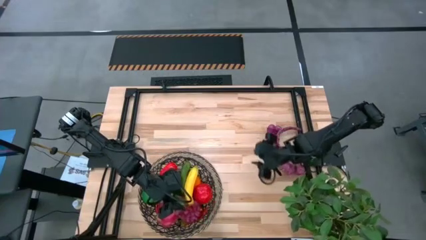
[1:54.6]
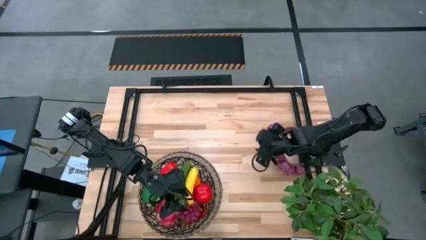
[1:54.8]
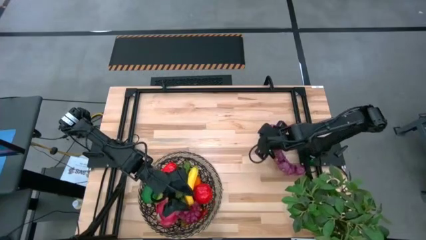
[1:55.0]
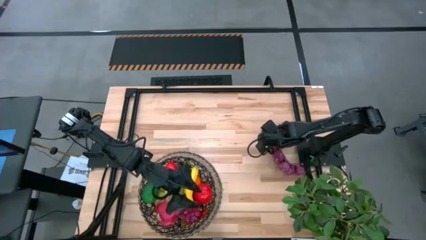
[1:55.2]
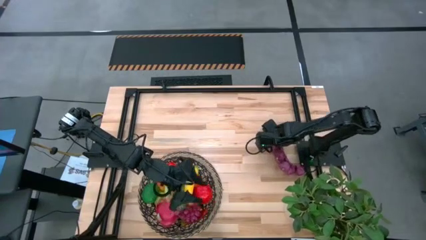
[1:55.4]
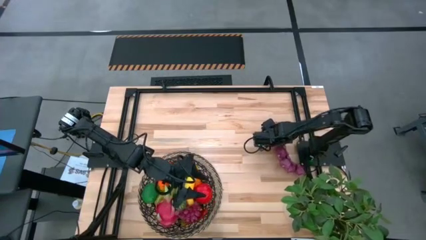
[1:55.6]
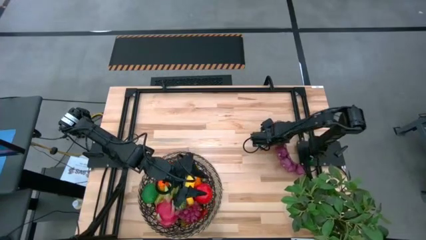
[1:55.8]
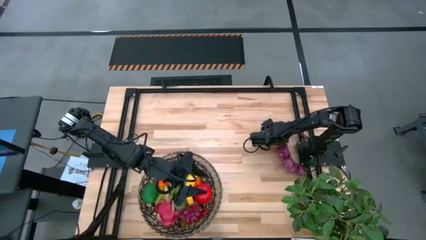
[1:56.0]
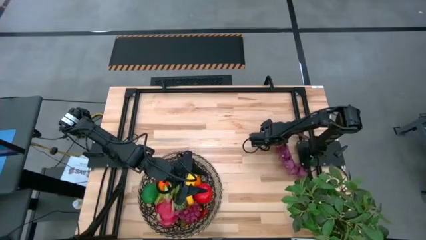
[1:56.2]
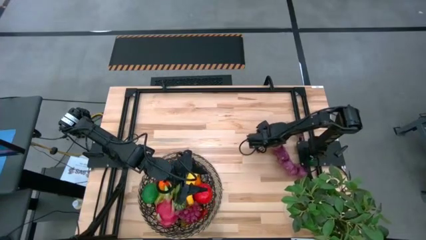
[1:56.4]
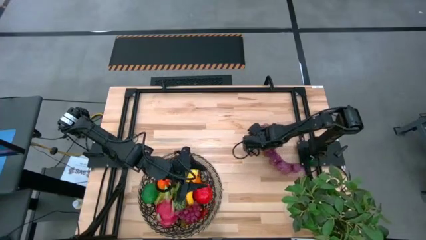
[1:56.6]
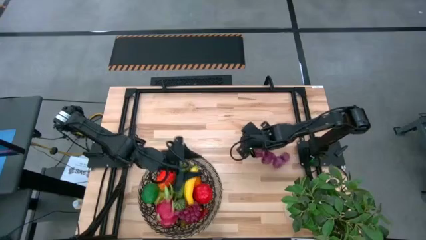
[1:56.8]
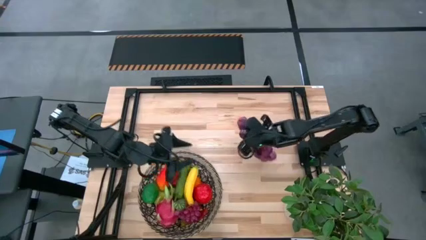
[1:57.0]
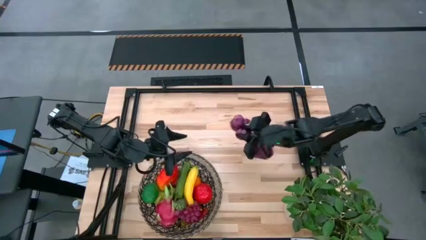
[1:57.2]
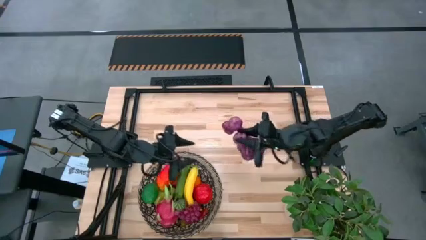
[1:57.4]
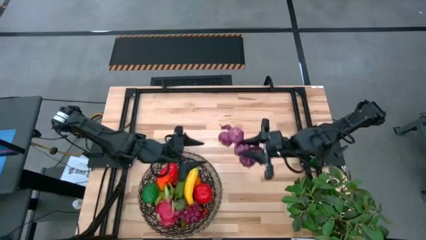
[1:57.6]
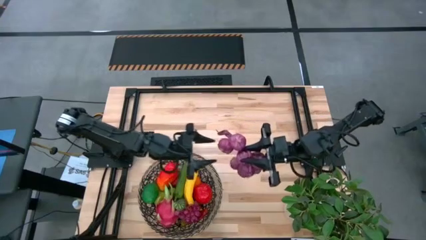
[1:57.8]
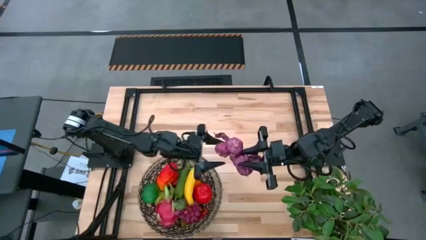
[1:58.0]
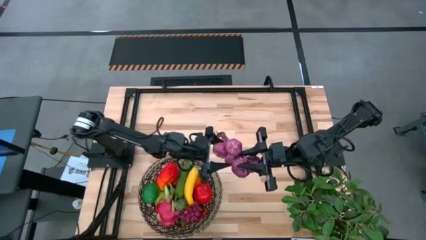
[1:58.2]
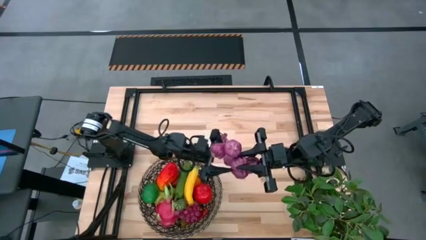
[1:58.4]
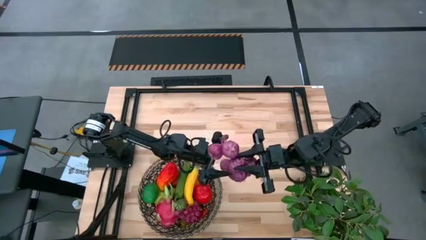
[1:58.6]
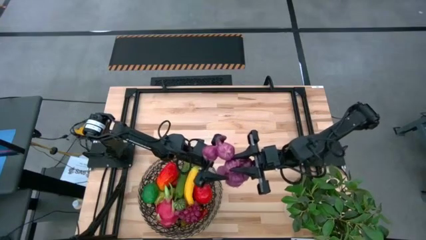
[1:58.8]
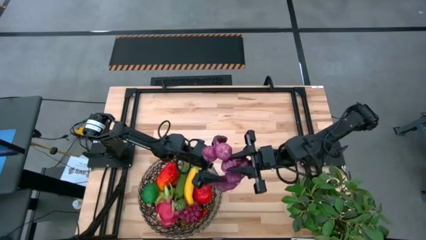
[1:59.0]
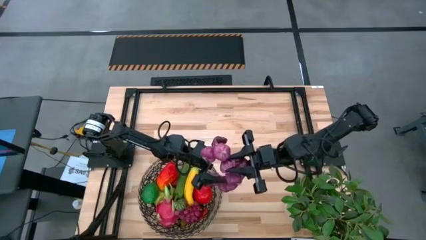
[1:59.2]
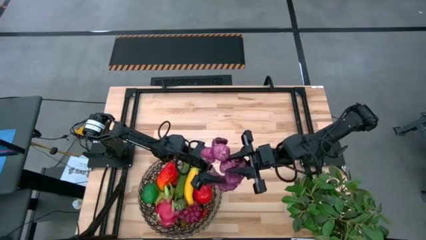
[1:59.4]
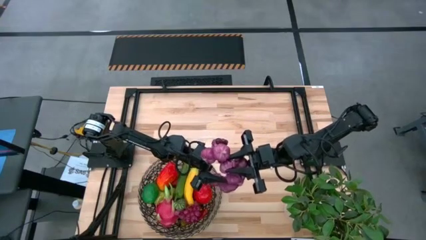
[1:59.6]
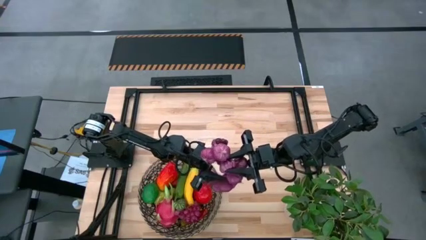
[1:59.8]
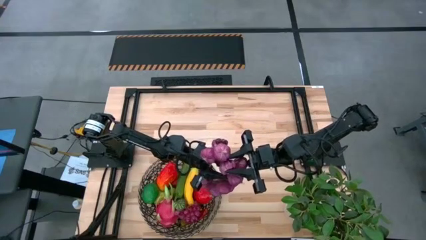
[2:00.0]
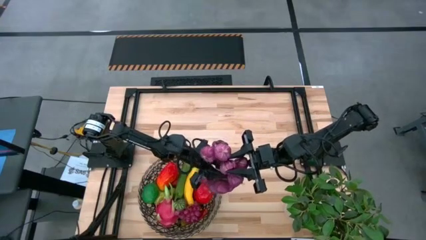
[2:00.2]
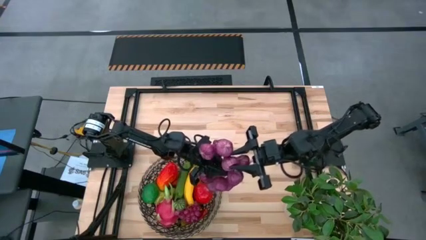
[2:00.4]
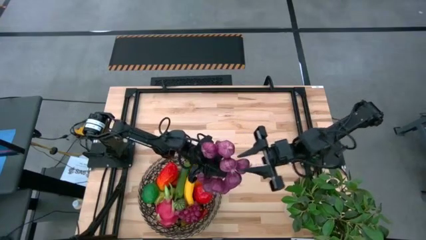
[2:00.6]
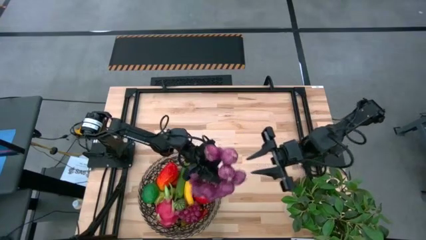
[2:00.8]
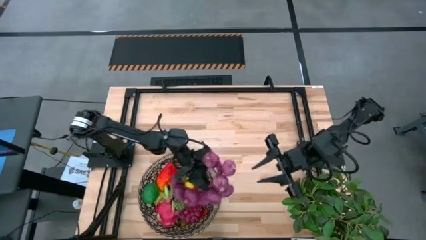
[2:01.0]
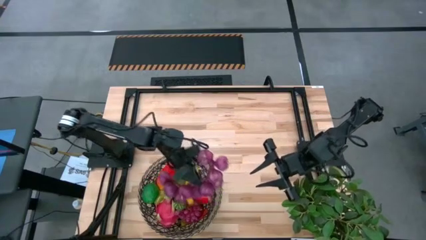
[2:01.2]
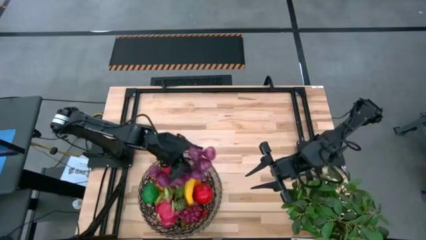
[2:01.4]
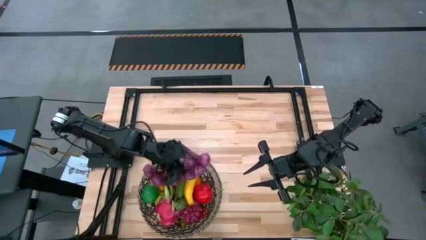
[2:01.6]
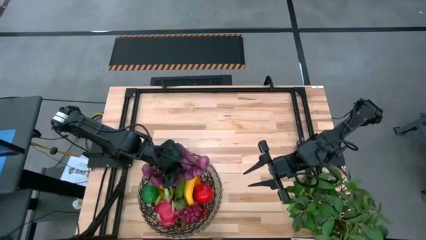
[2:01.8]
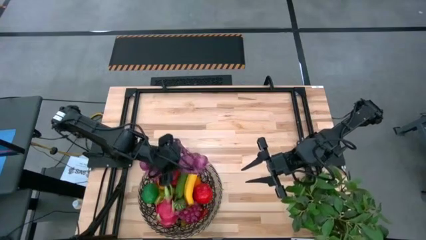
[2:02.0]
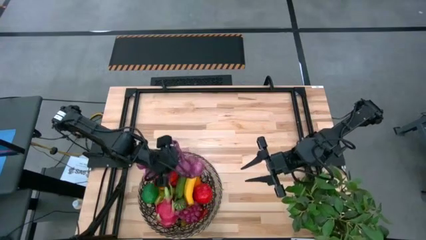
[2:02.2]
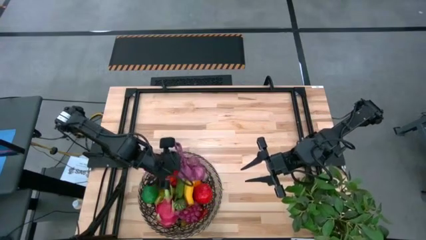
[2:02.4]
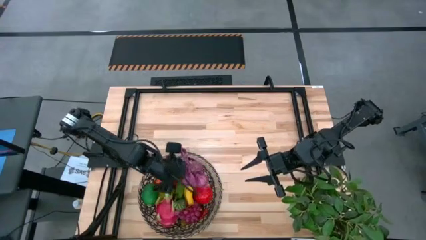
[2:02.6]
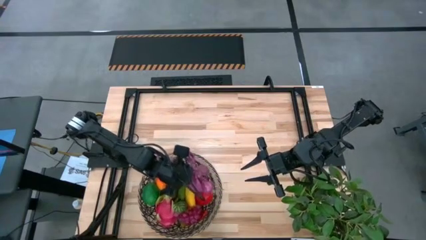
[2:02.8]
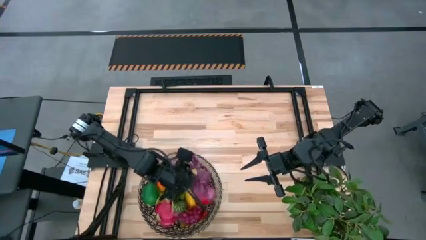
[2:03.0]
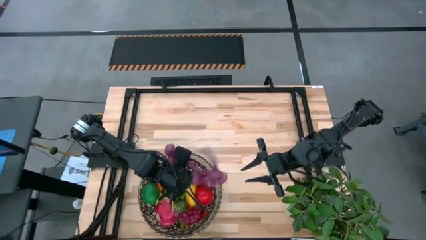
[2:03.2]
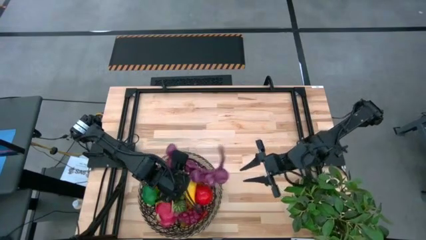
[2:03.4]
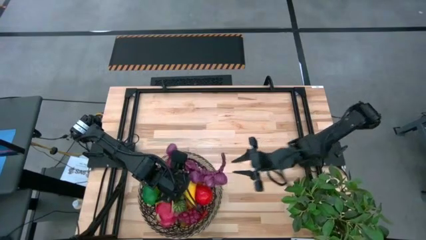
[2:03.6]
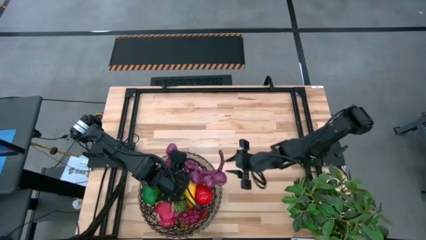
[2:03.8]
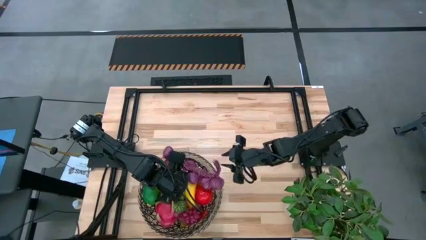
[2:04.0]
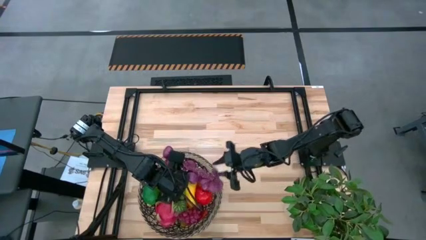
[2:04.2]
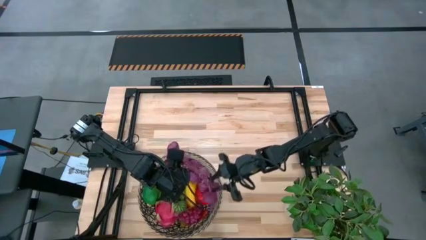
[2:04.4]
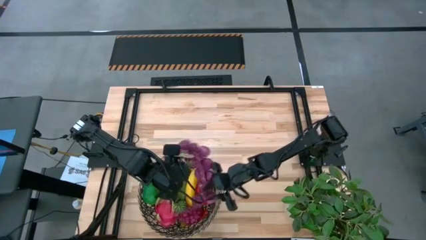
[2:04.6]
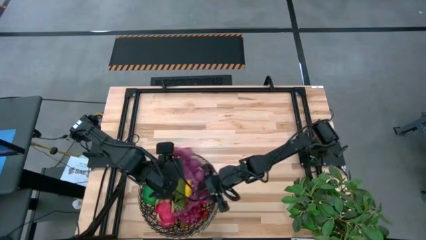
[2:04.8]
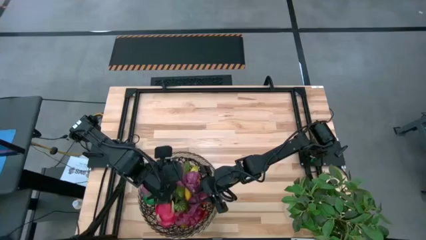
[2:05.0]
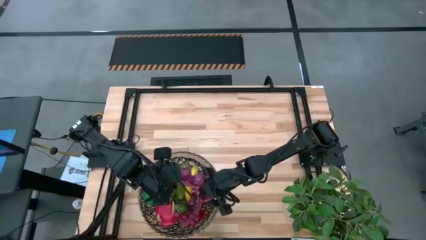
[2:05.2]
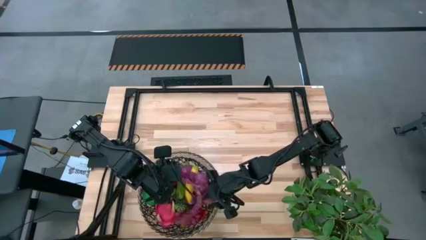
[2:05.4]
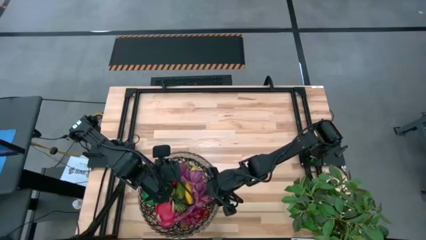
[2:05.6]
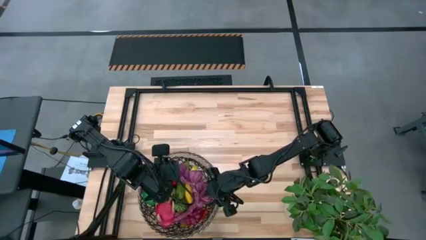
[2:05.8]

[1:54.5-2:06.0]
Task: Build produce basket
Put the garlic into the woven basket
